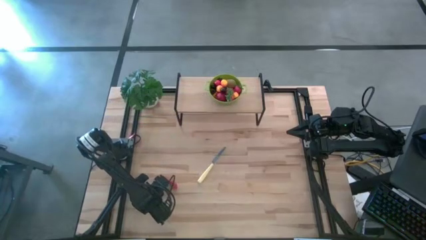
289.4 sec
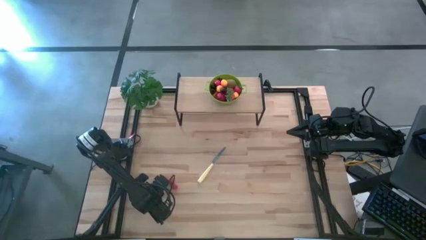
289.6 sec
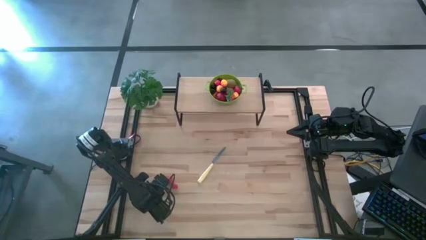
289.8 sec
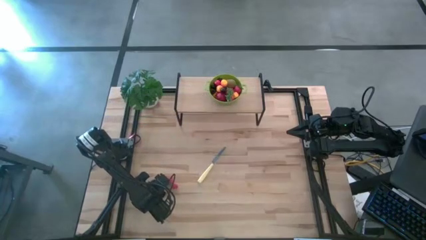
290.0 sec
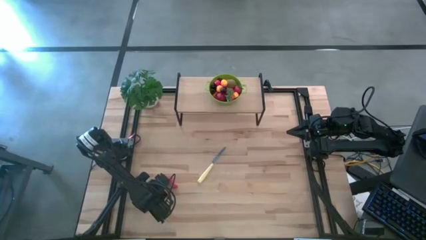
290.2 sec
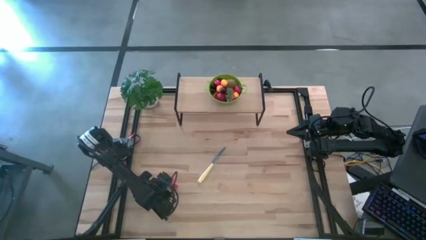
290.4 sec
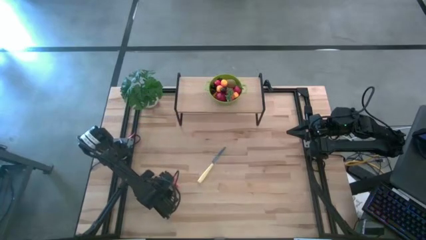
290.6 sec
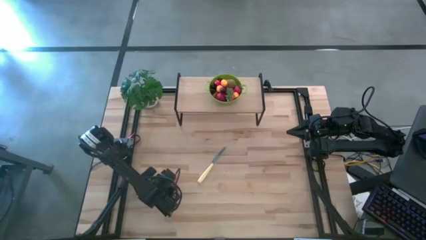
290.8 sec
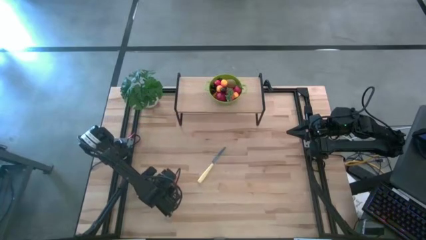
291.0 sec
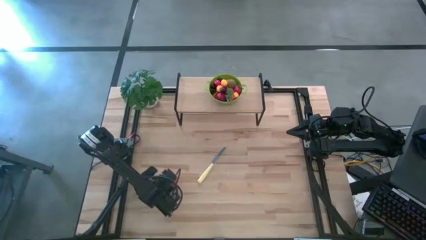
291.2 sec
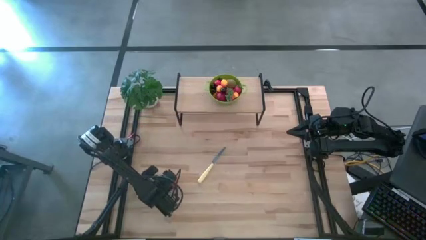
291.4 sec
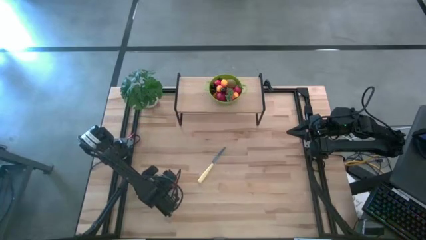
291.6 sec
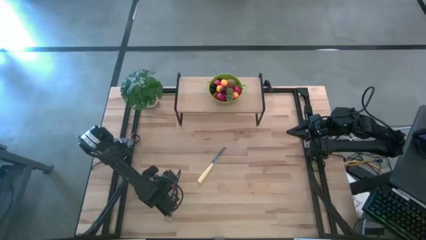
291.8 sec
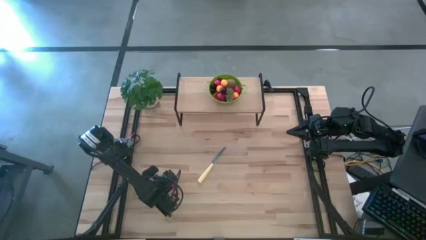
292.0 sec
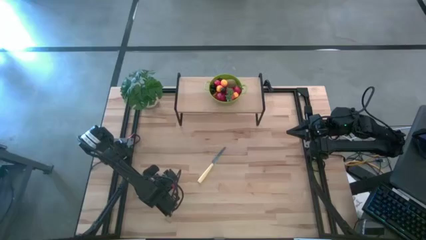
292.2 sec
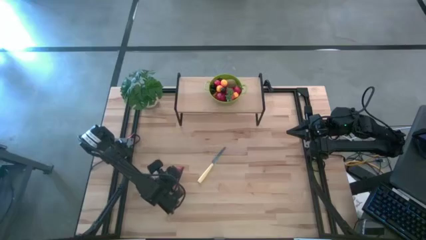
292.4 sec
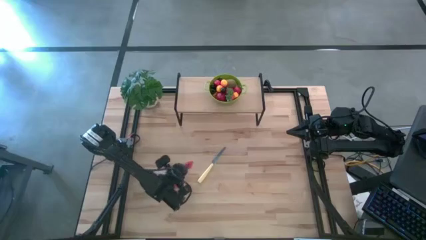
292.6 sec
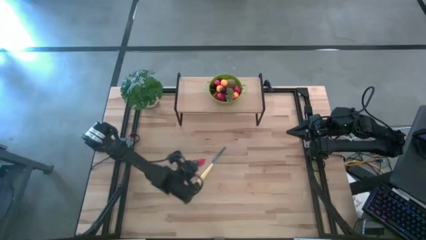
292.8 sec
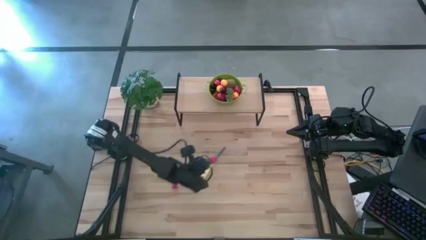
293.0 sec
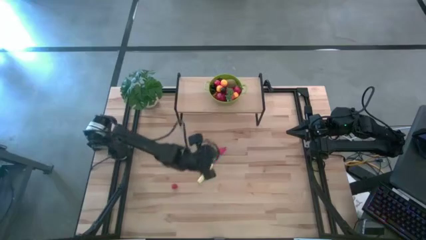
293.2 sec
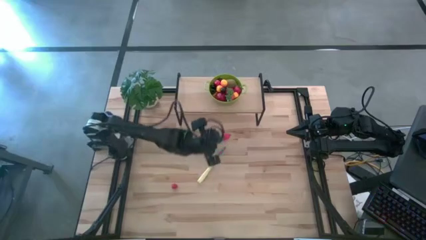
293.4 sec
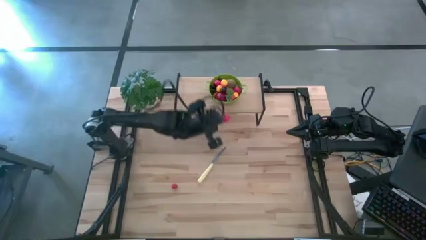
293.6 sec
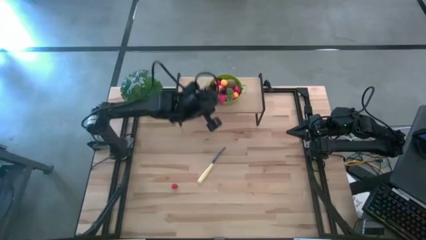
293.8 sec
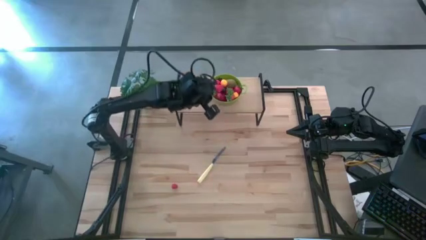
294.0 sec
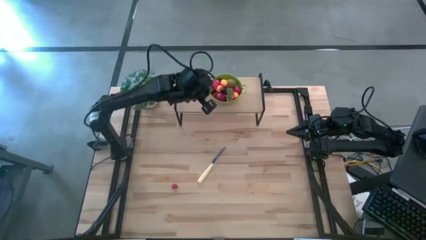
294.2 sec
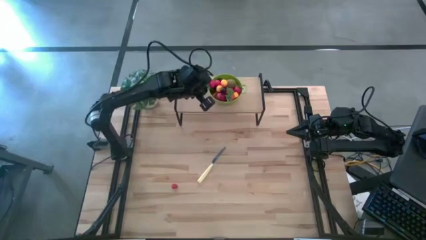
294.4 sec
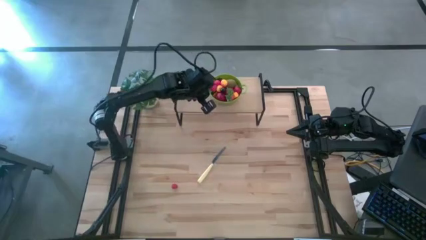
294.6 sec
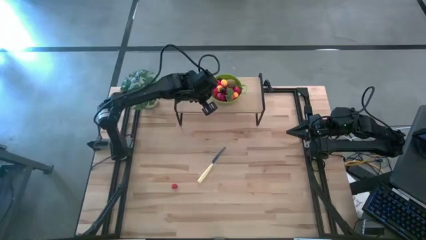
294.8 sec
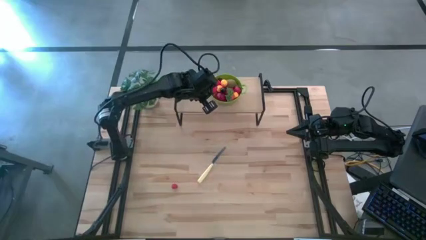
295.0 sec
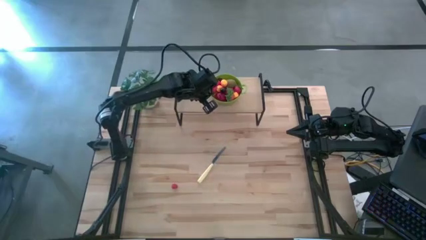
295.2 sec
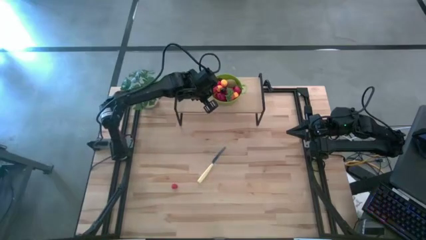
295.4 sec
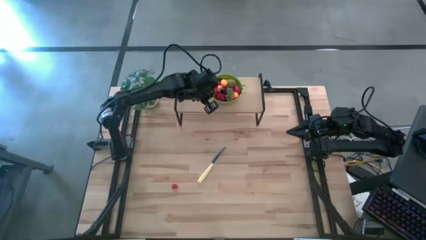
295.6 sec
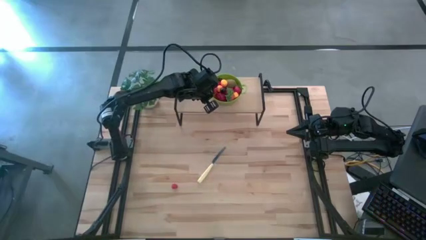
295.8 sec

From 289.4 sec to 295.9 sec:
Task: Pick & Place Fruit
Put the strawberry into the strainer bowl

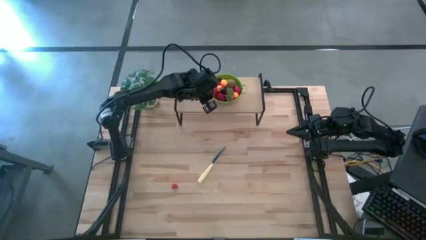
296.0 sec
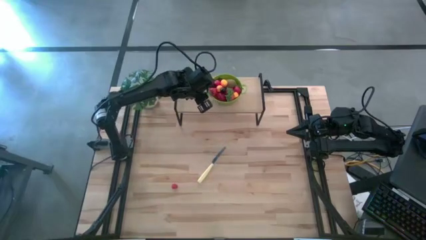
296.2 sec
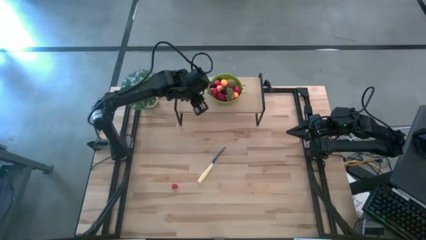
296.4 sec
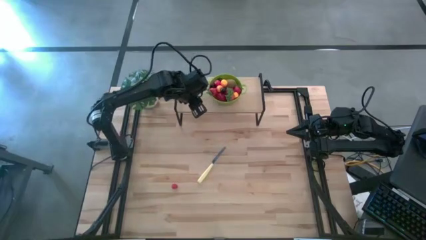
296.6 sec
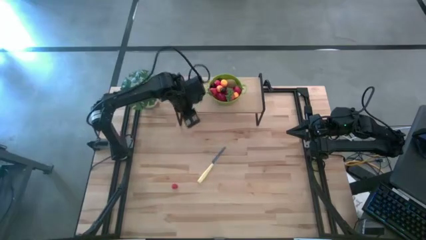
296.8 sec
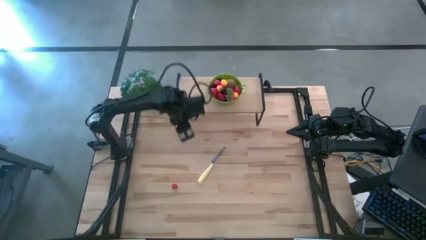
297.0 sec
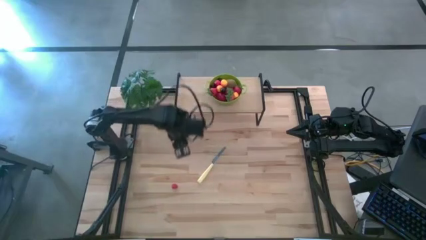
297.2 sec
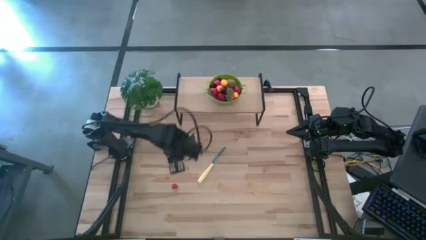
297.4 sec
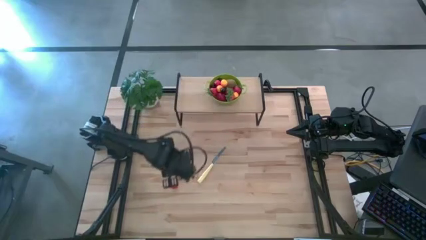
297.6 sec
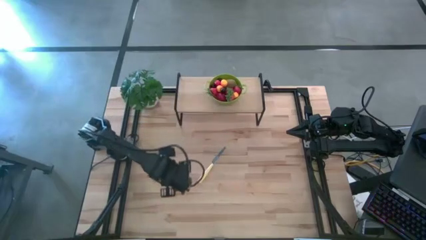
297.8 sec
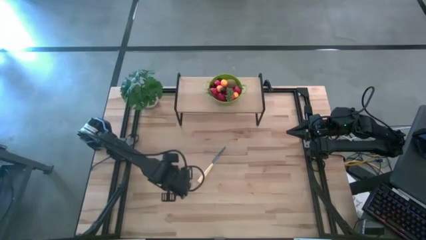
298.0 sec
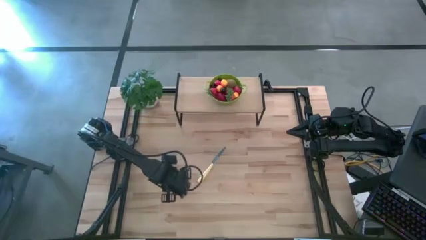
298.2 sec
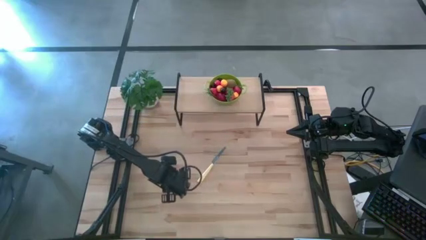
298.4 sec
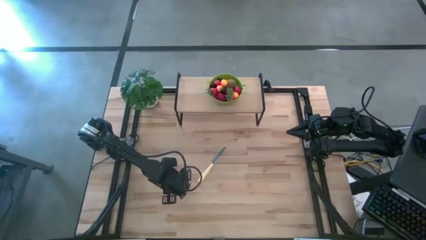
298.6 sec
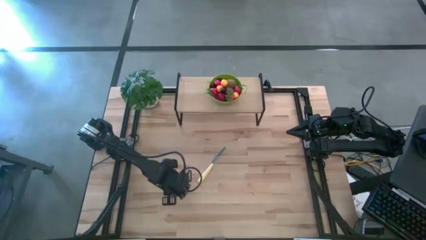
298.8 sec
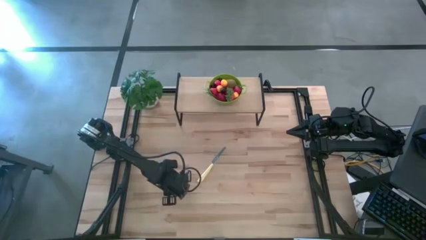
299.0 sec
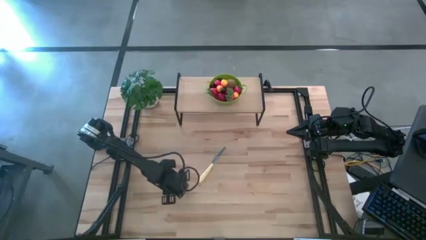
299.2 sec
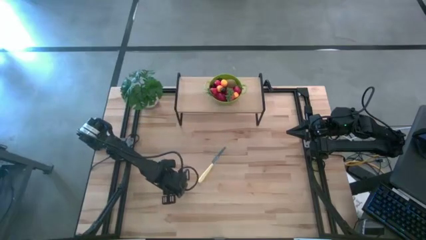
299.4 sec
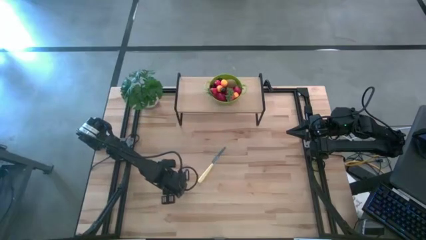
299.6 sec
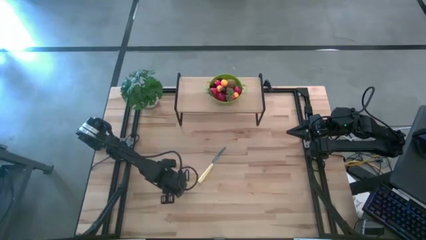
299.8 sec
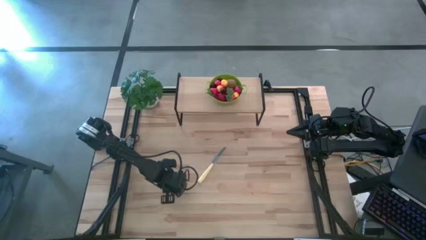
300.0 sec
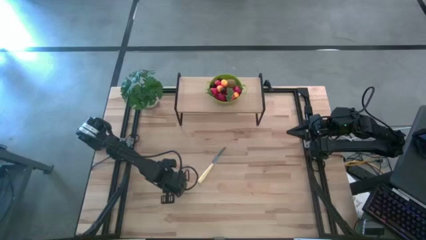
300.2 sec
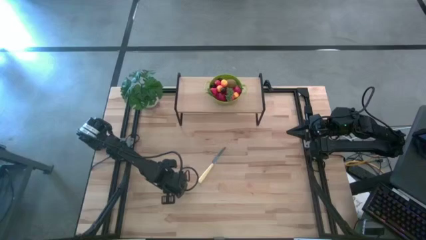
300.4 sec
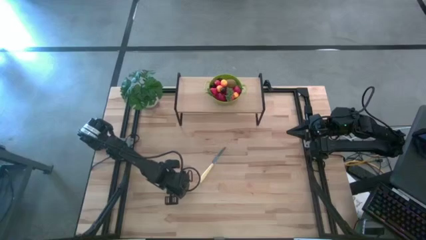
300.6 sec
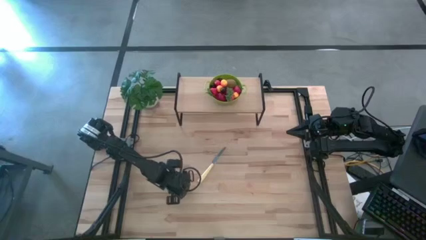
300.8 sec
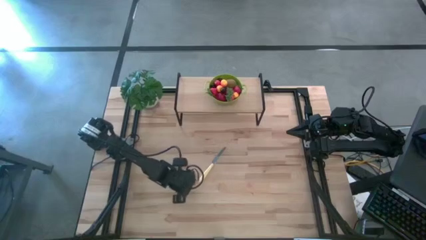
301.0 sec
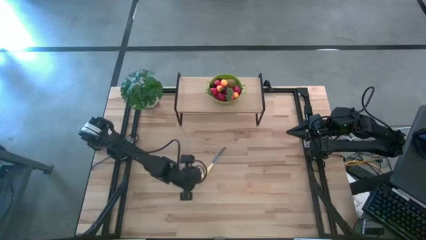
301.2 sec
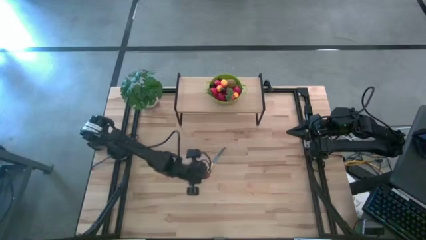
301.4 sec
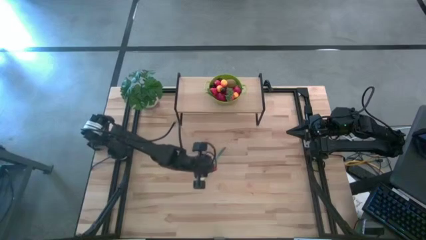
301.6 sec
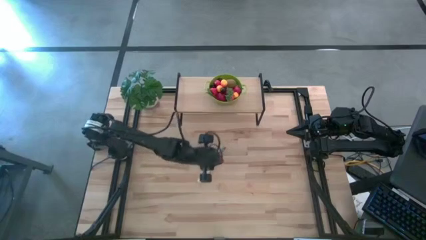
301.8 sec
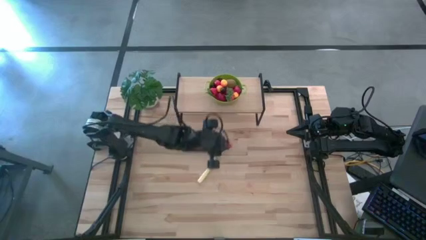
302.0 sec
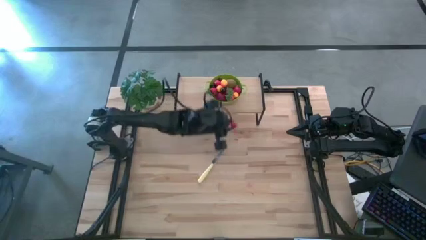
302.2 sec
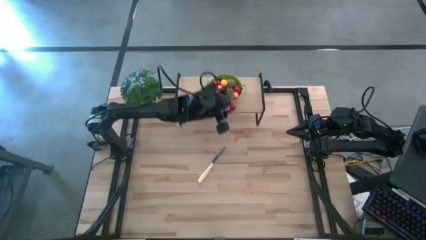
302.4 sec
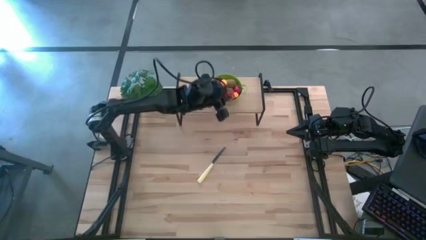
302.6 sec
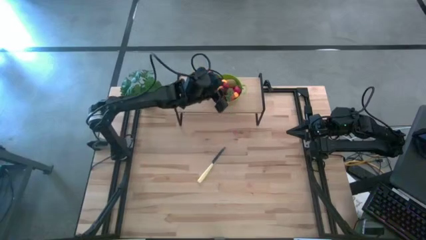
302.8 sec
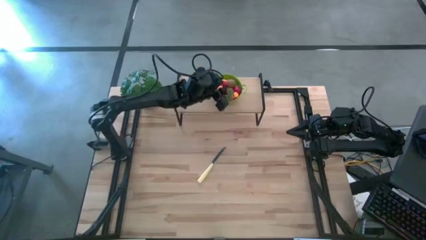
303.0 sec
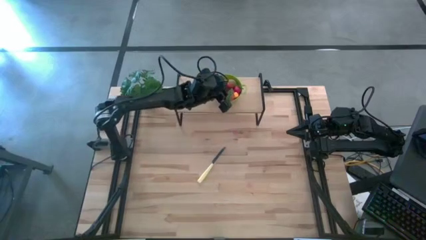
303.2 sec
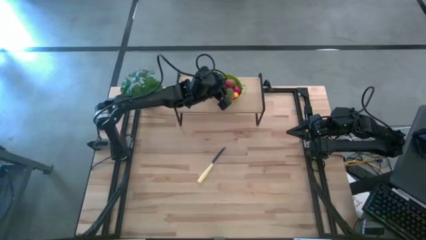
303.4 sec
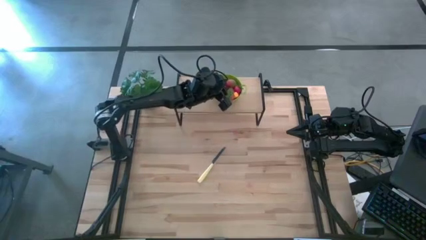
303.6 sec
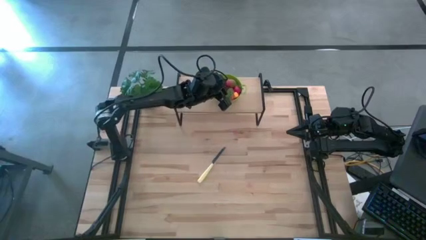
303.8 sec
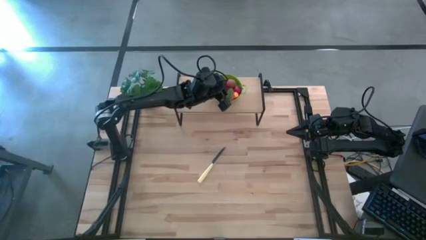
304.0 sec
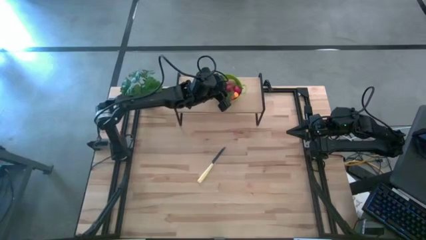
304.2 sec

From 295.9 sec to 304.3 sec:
Put the raspberry into the strainer bowl

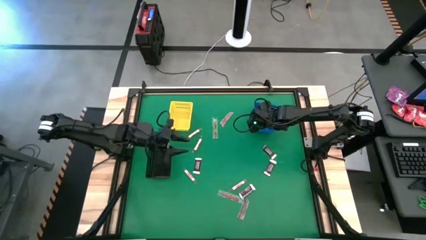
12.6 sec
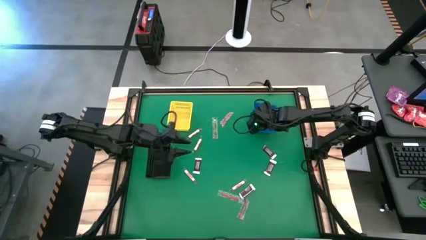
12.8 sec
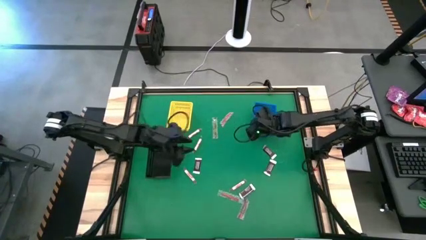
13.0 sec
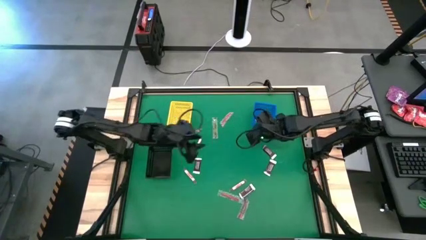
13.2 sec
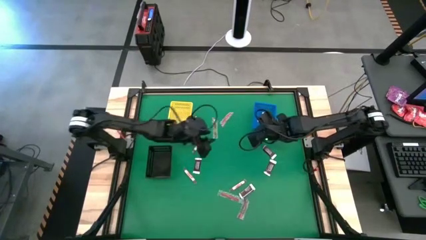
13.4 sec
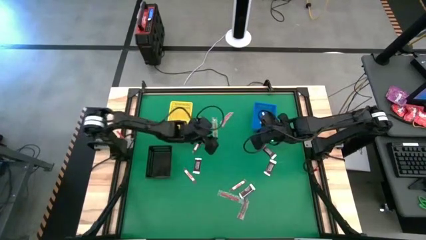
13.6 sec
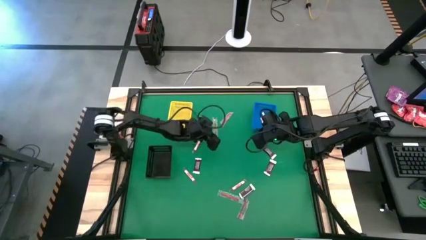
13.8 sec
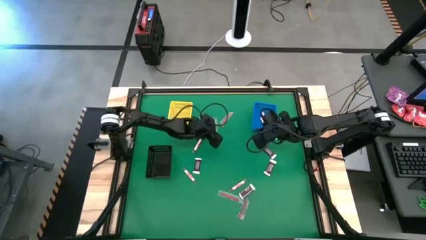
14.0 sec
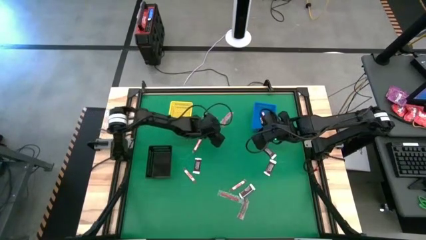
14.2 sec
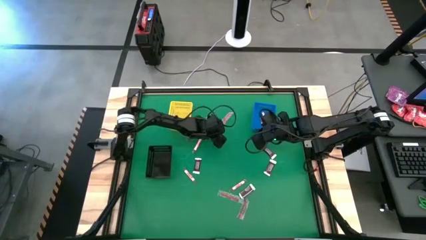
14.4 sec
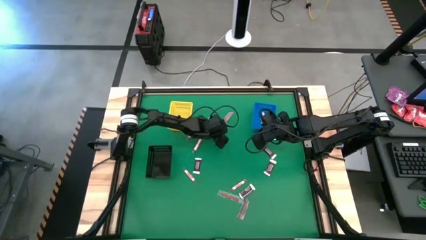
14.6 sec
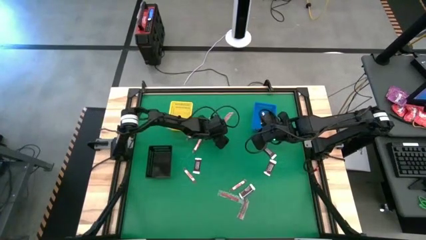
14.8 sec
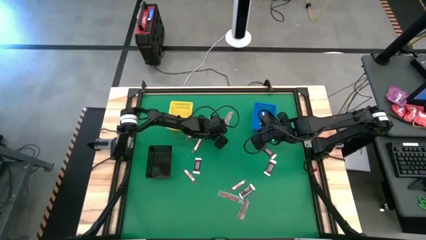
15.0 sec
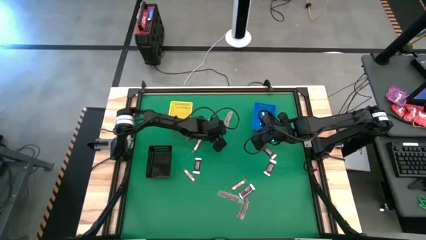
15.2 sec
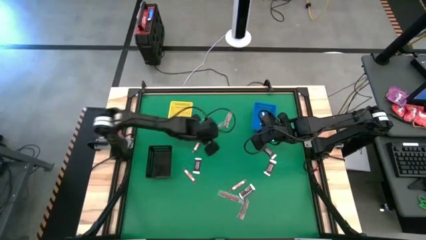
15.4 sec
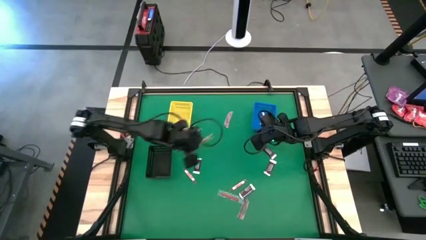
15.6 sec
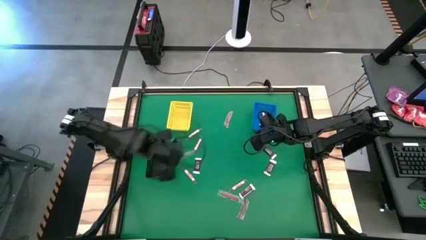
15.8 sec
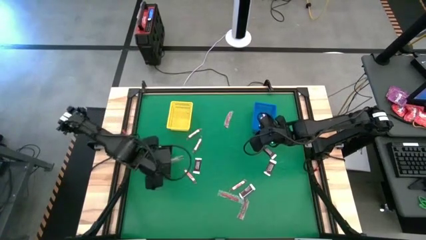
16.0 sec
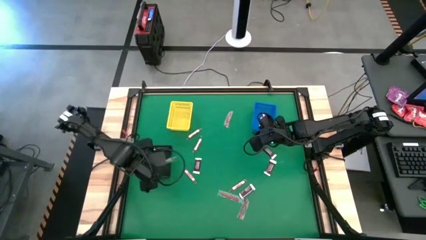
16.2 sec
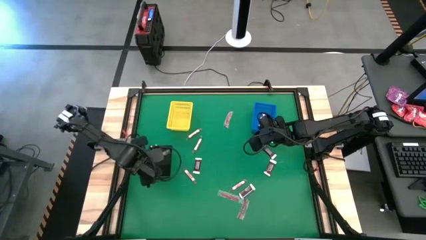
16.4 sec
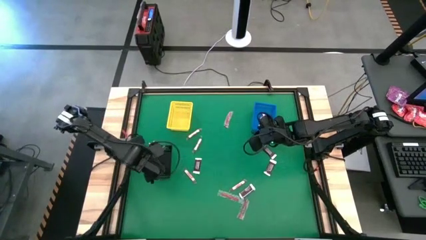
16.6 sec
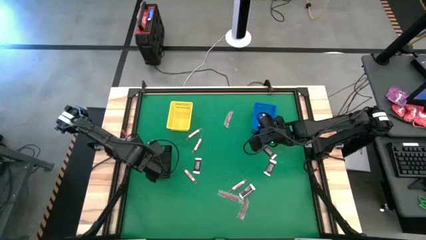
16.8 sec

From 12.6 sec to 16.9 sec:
Task: Sort candy by brand, put in halloween buckets
Put the green candy into the black bin
